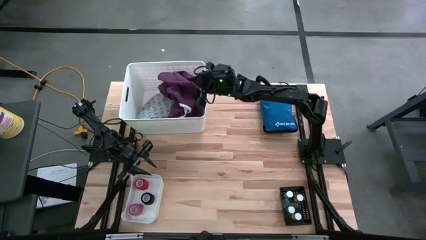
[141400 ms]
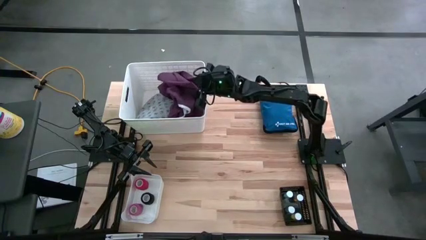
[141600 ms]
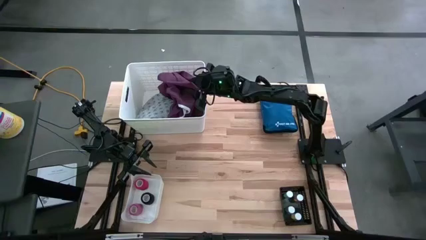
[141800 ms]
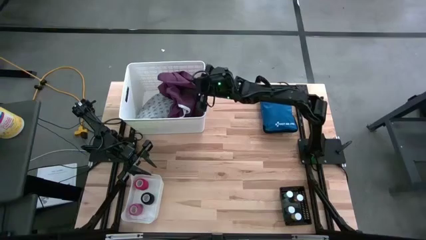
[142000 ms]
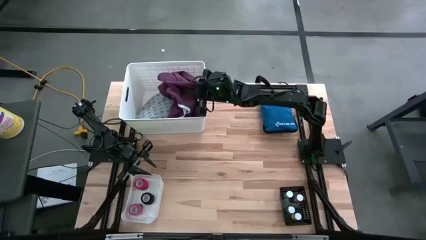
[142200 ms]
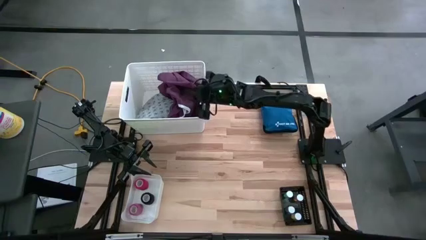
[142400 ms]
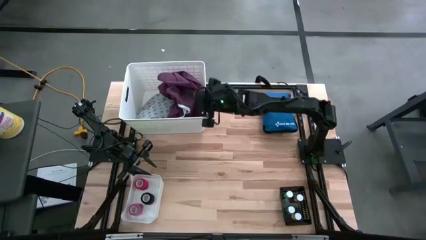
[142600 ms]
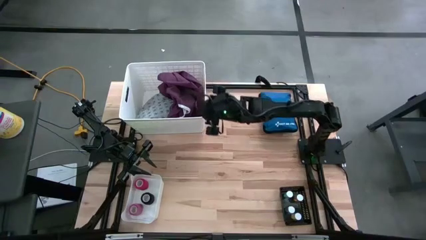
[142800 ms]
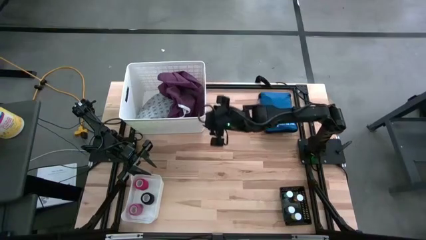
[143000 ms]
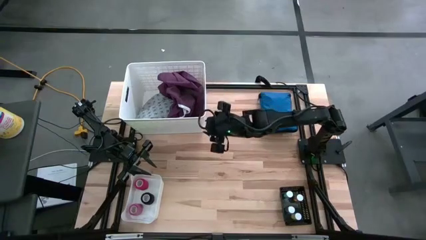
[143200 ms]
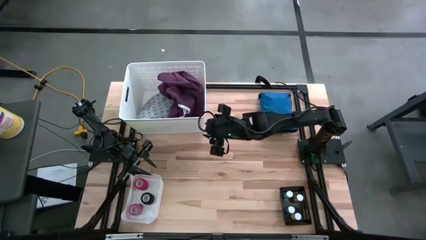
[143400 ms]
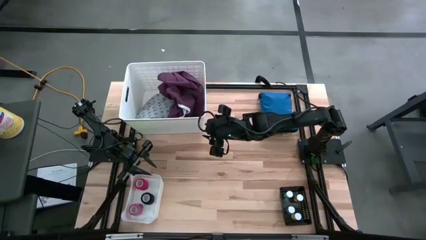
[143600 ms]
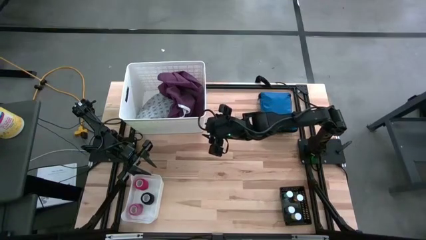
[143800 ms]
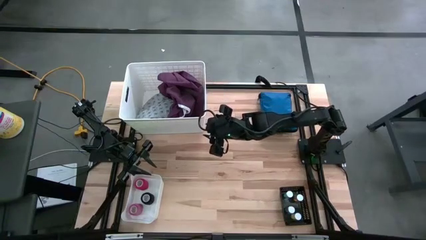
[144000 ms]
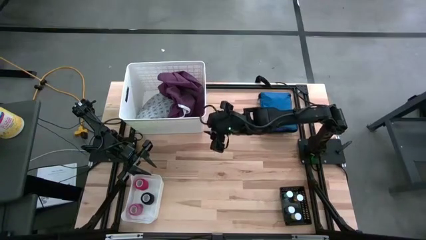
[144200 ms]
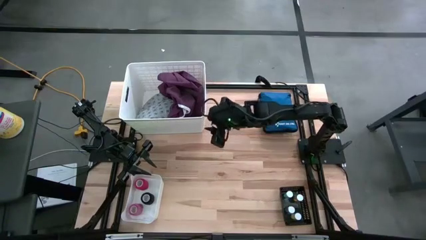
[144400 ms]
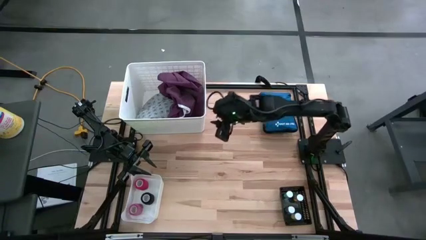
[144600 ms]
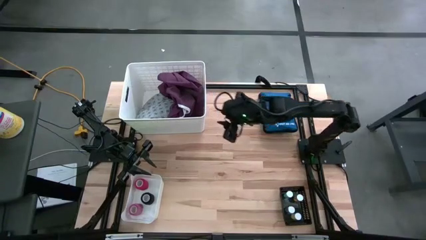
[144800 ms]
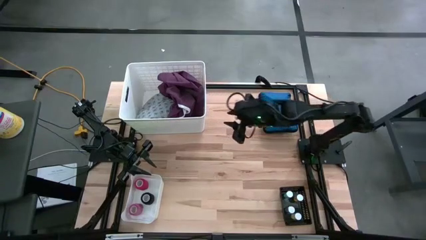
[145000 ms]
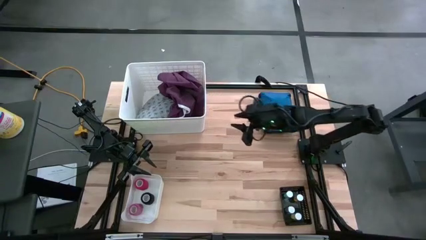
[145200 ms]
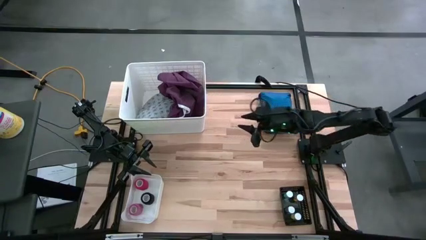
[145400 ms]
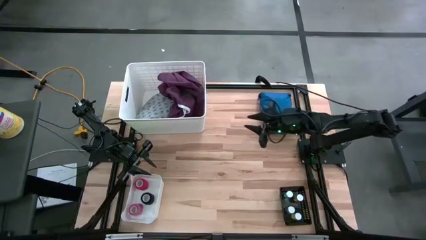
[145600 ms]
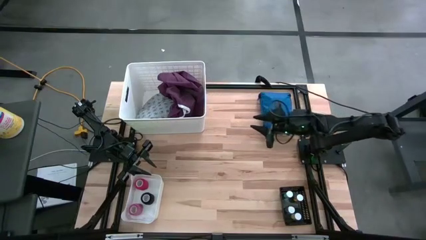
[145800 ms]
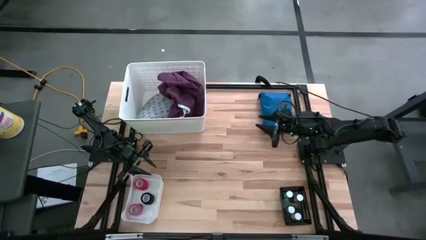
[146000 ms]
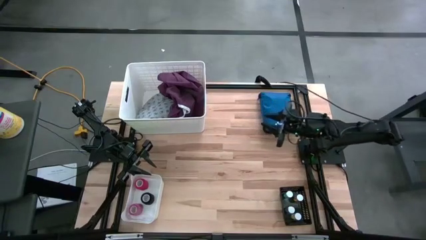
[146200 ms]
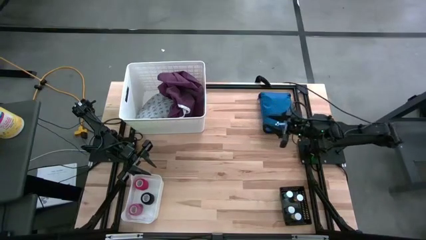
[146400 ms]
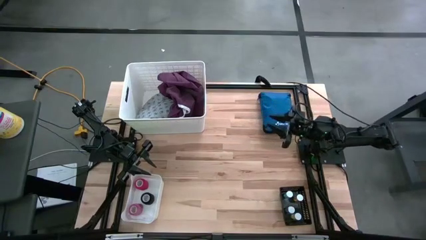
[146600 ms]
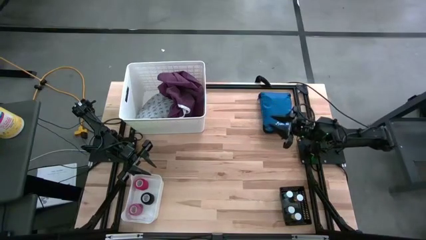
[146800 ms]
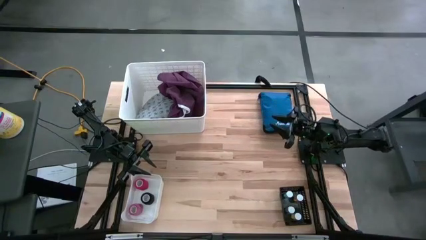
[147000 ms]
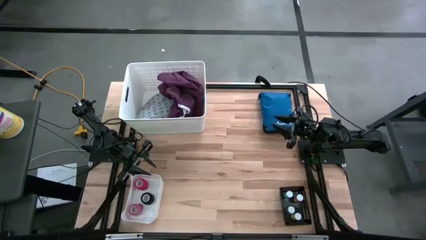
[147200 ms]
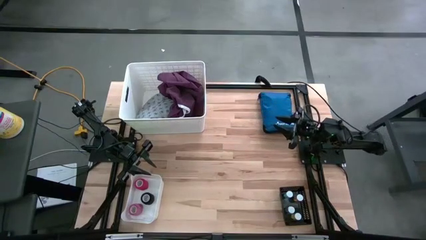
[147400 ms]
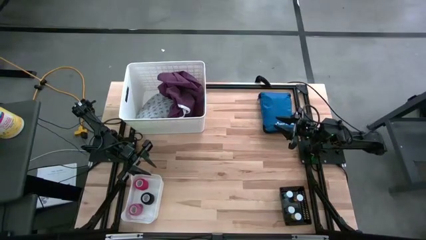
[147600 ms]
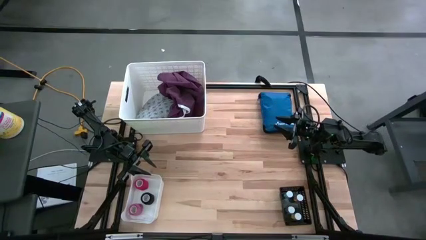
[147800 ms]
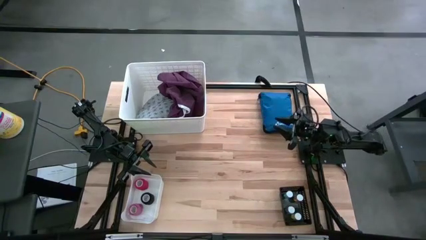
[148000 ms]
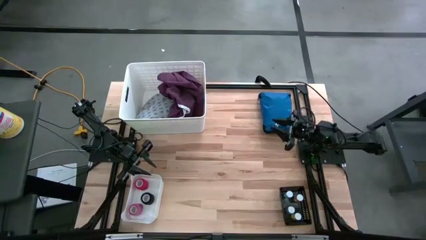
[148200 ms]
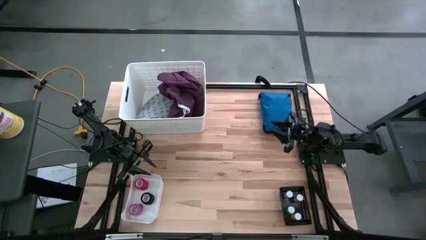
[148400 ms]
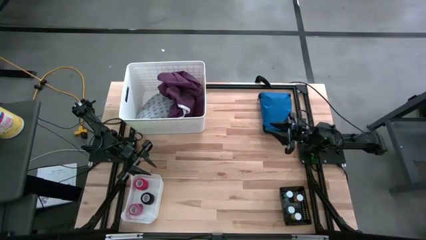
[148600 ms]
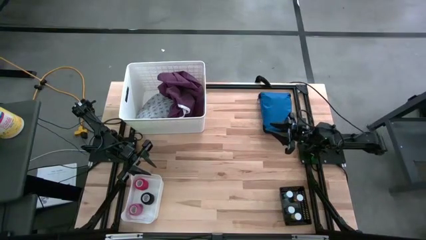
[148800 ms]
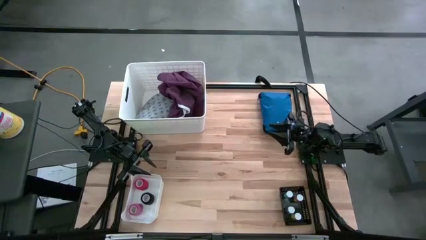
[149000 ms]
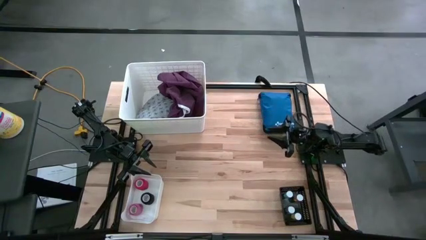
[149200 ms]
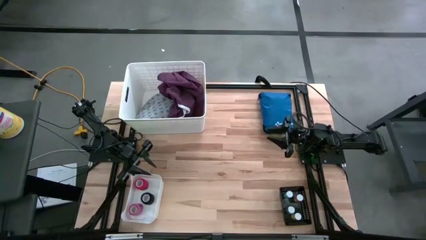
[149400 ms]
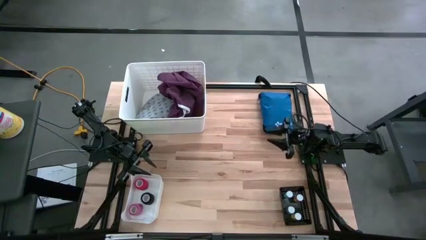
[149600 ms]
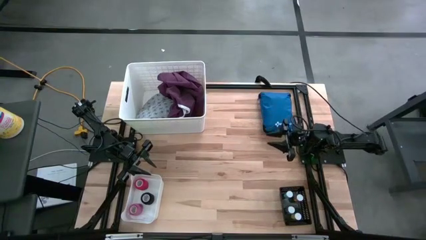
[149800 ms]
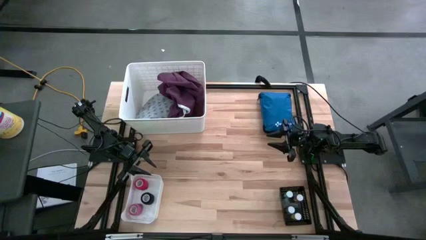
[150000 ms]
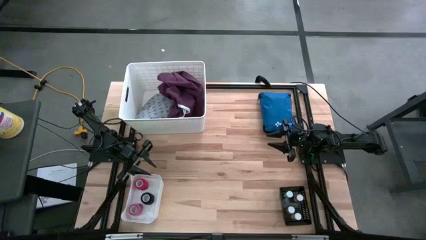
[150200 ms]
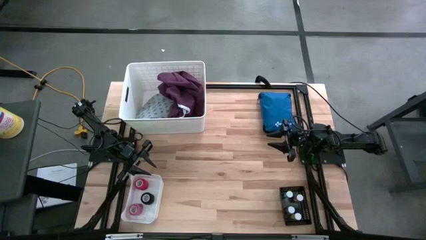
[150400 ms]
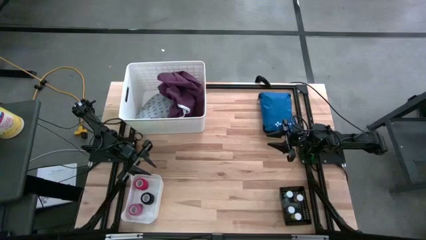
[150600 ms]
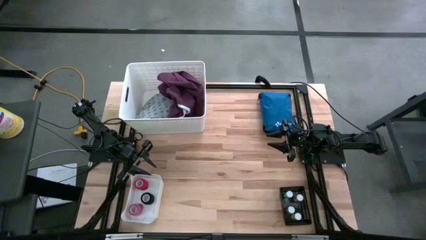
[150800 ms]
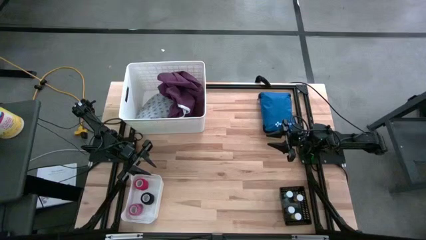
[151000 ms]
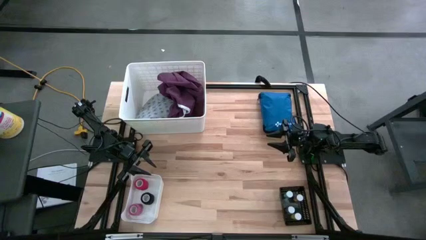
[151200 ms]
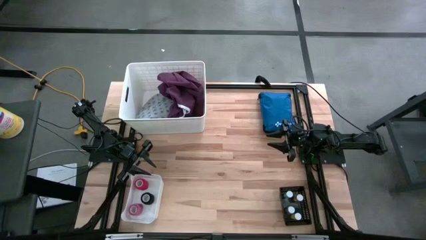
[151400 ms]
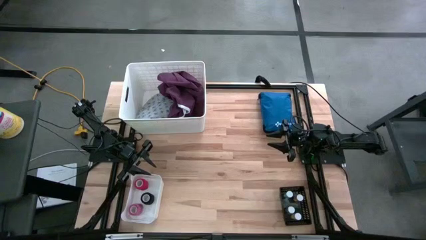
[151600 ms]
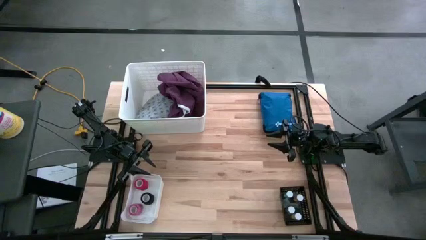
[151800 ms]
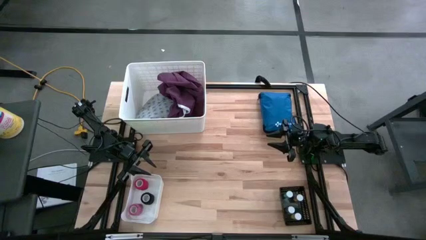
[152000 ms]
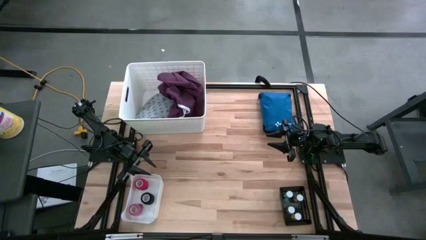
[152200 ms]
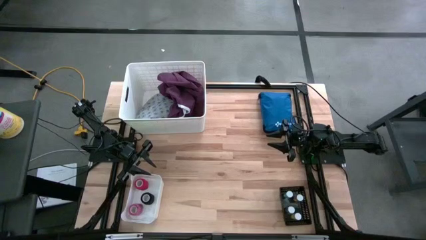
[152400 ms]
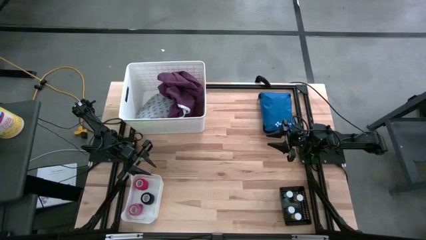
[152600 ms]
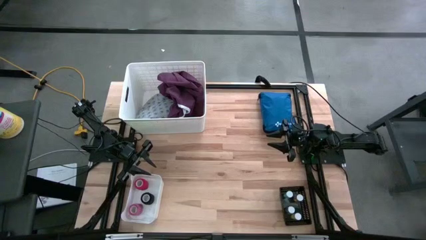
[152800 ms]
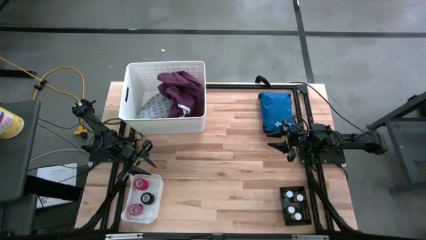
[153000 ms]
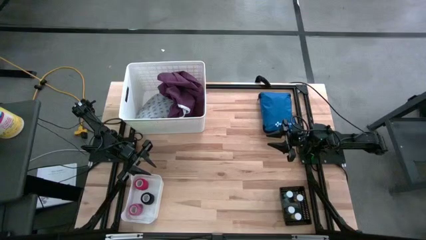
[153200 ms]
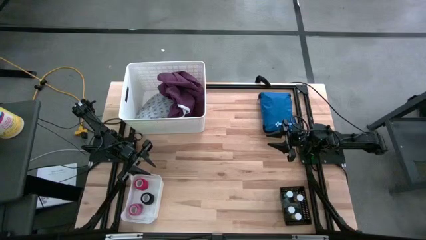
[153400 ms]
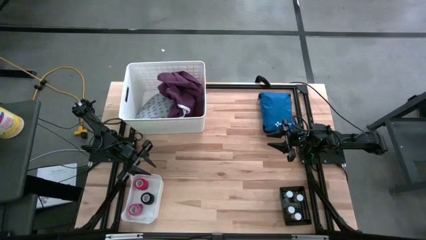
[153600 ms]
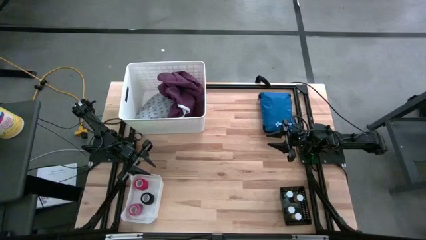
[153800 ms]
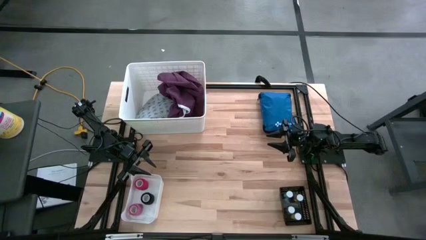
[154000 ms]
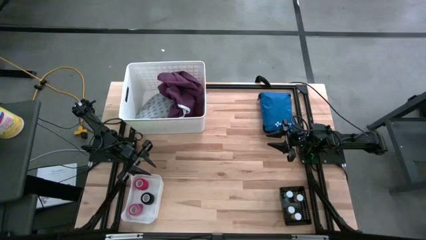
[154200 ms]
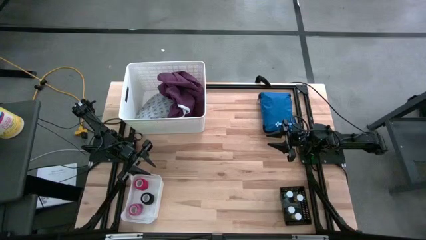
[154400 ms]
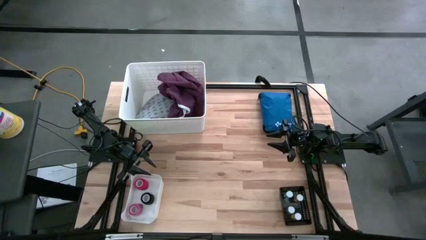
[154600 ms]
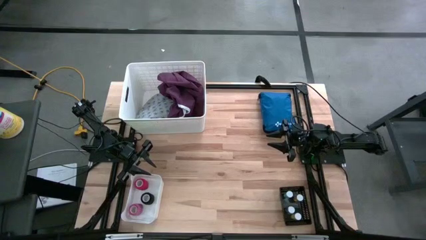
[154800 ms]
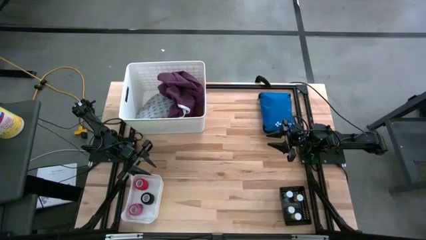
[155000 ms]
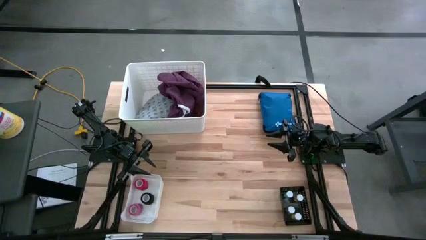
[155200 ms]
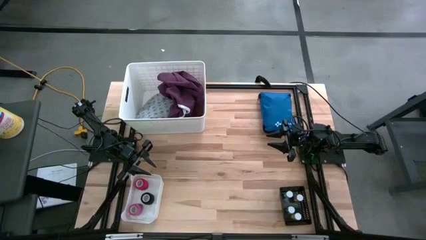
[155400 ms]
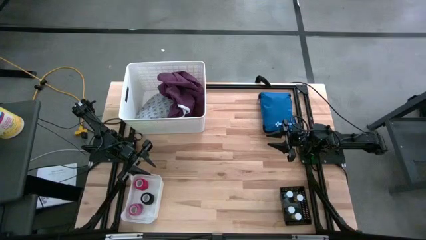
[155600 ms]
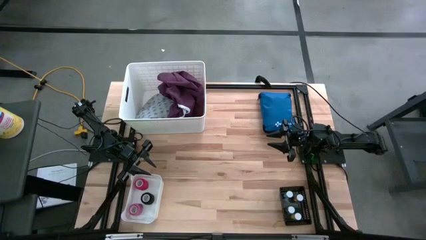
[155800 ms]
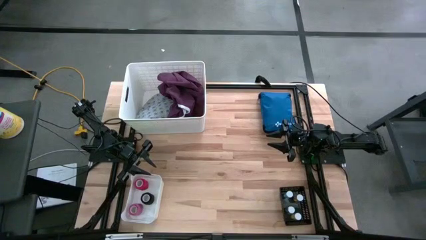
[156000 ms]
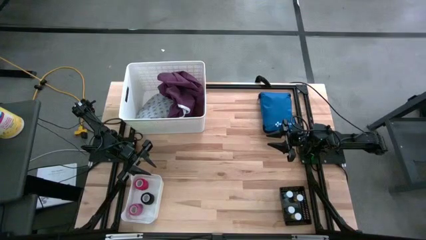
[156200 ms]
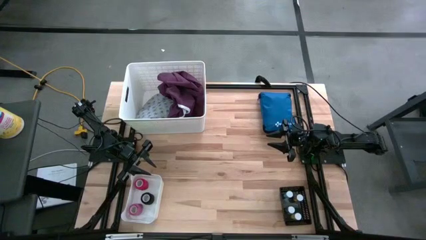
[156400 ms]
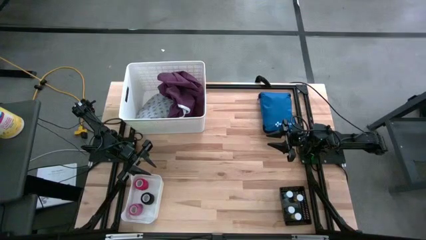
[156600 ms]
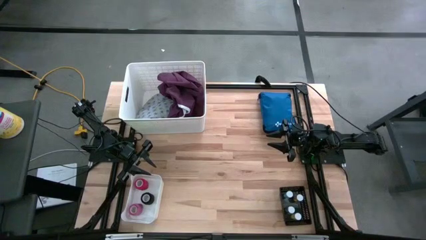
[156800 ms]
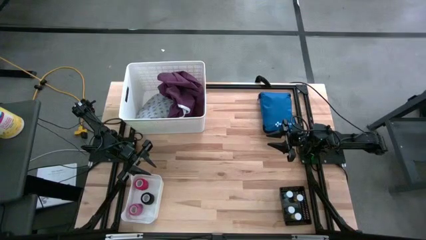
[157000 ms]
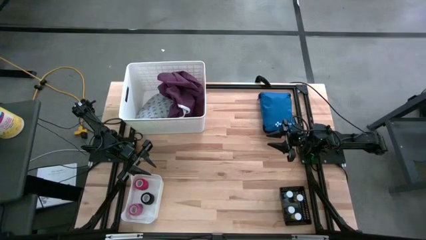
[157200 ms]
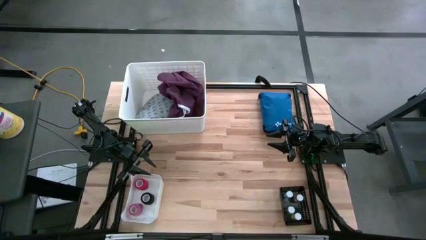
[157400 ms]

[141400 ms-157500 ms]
Task: Pick & place medical supplies in basket/bin
Return to Home Position
